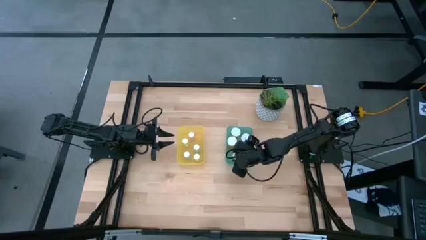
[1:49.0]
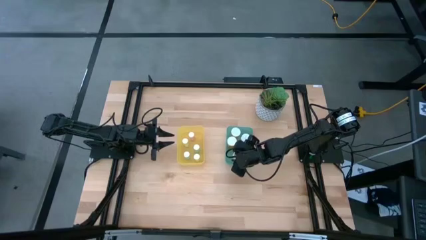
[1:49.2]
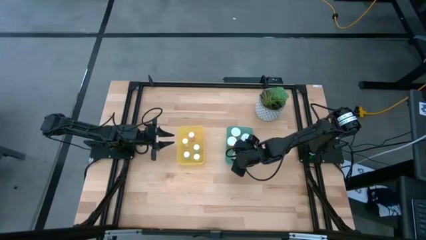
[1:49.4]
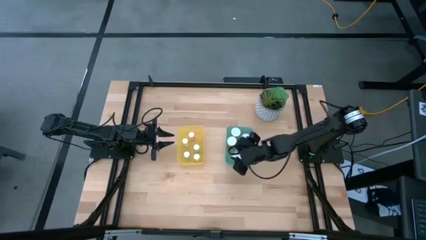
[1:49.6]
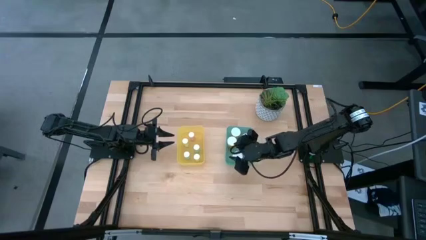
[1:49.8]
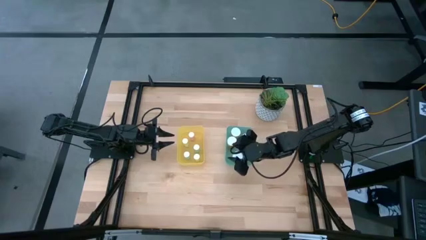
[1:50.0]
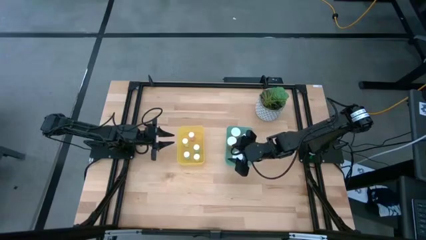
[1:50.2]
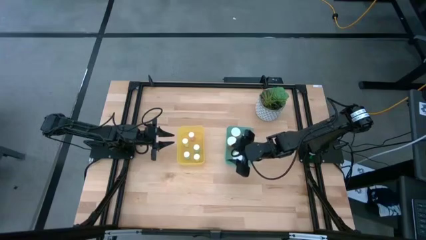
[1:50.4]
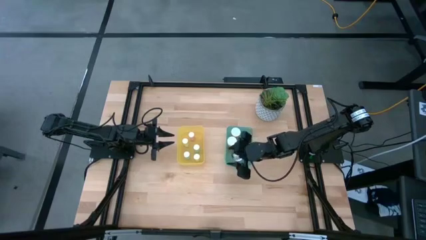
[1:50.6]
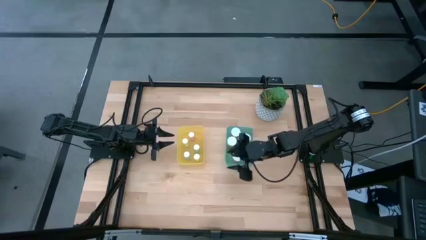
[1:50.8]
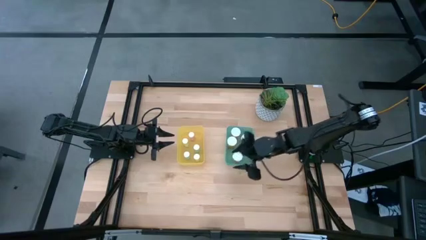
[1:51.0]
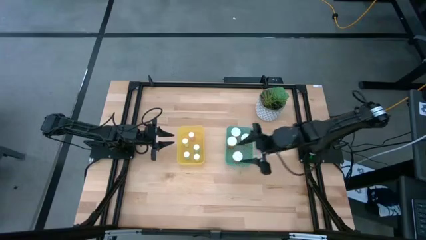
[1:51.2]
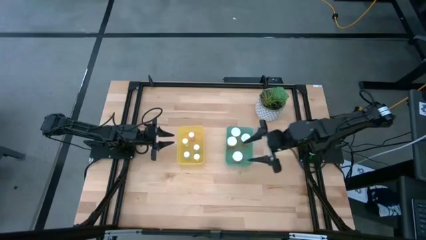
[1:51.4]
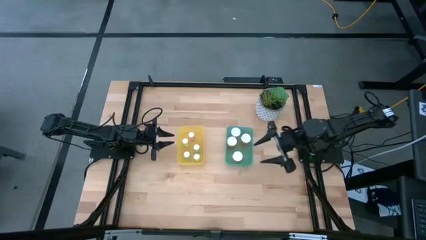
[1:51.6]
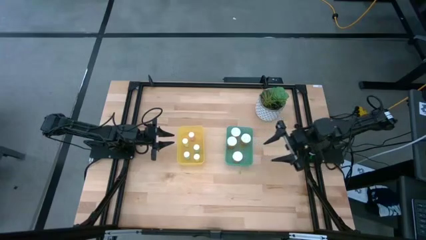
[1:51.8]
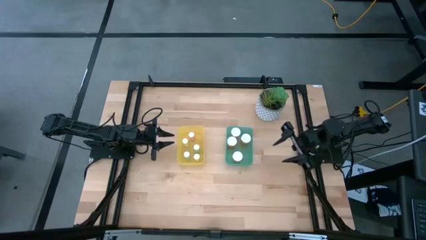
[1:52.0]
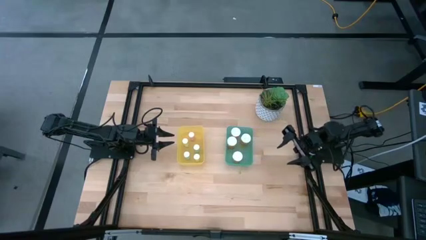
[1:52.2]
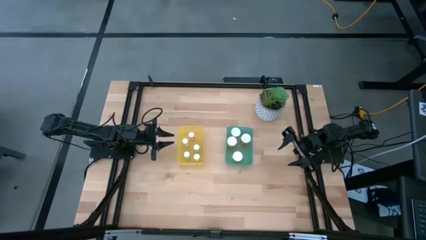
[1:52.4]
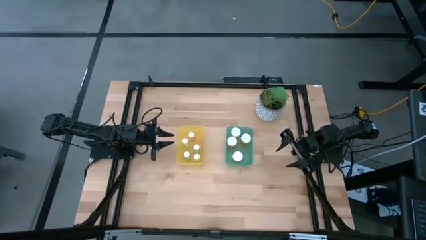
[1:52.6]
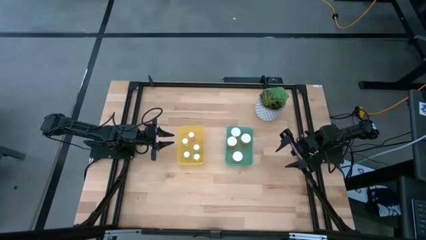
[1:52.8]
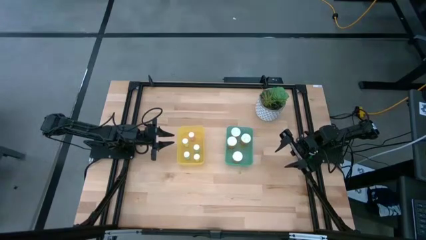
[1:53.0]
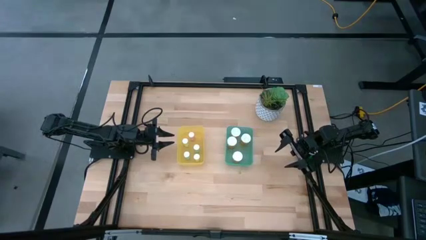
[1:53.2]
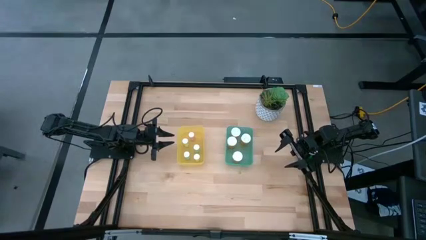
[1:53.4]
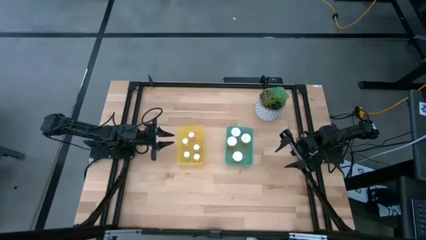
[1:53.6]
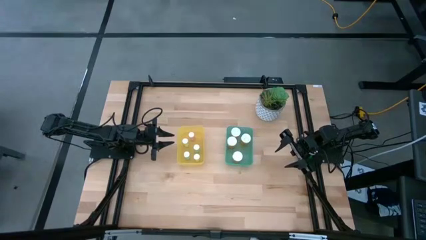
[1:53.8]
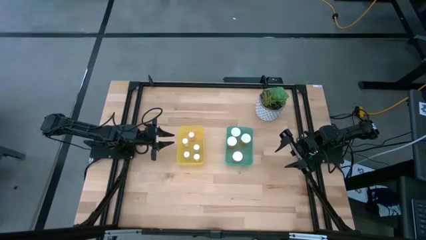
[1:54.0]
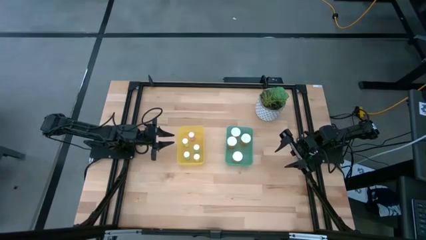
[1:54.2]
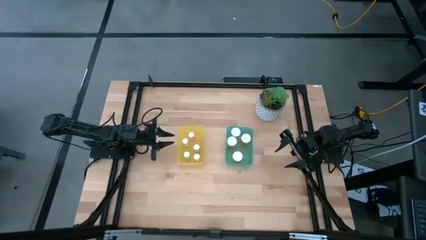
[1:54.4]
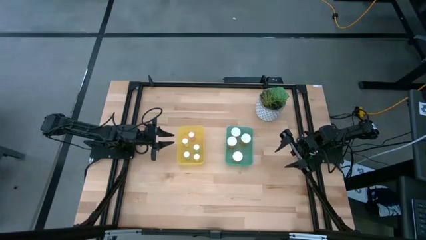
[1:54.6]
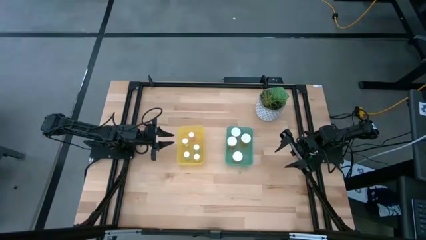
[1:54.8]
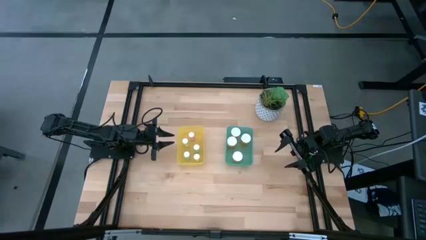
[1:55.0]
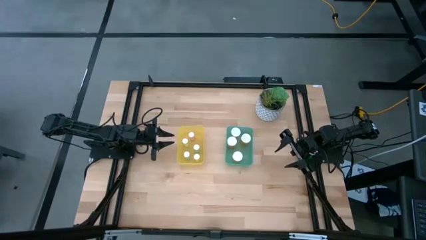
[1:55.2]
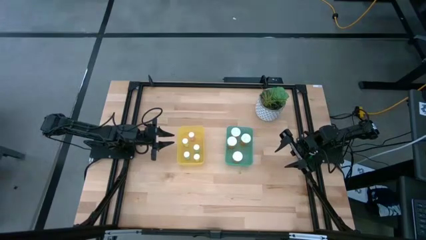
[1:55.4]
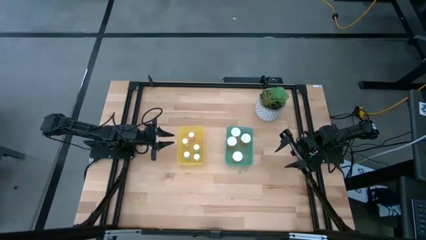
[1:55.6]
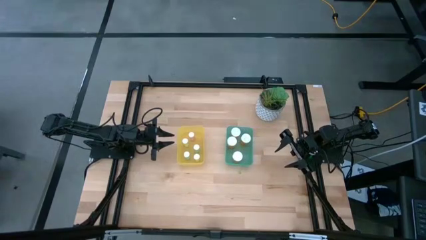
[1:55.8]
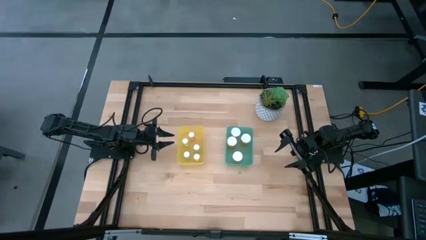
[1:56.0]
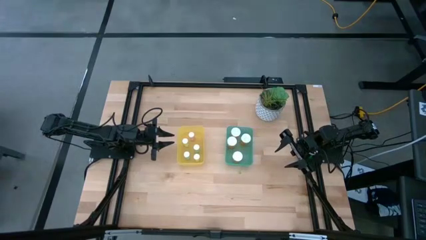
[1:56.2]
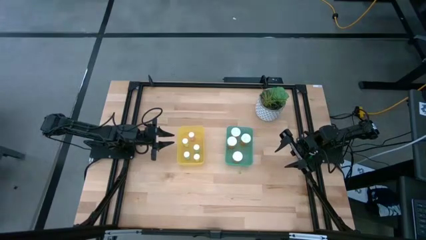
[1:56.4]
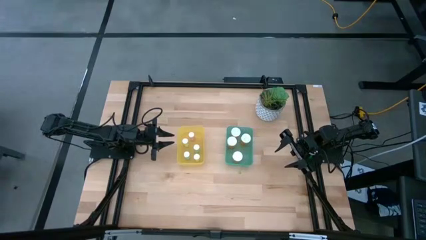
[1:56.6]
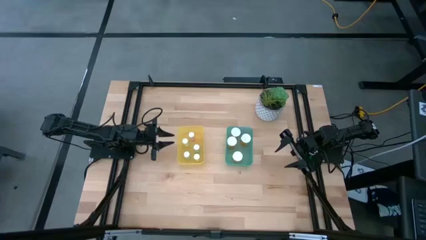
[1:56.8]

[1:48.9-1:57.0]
Task: Pick and place medicine bottles into bin by pill shape (circle, oval)
Return to Home Position

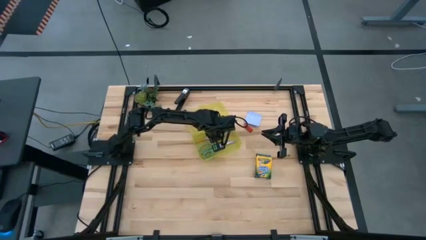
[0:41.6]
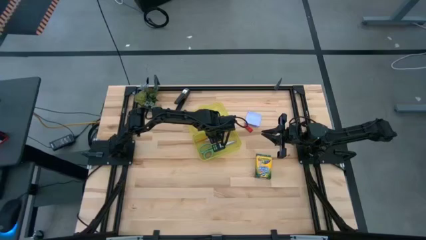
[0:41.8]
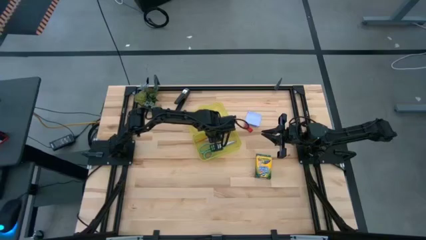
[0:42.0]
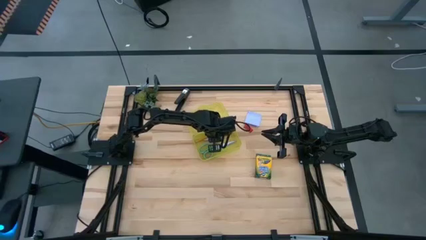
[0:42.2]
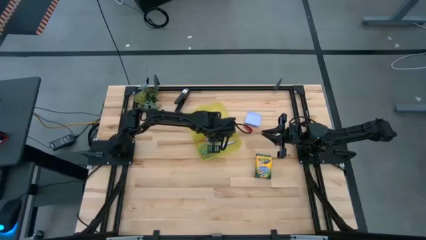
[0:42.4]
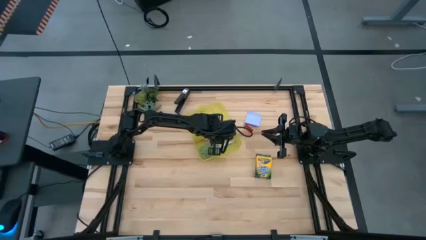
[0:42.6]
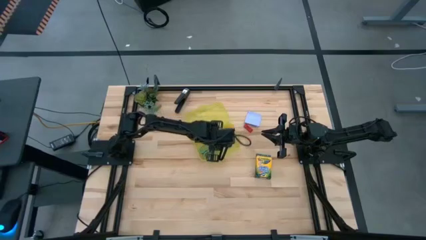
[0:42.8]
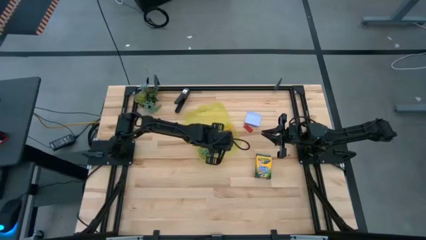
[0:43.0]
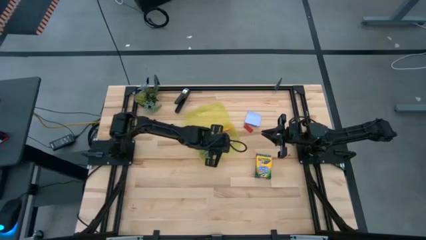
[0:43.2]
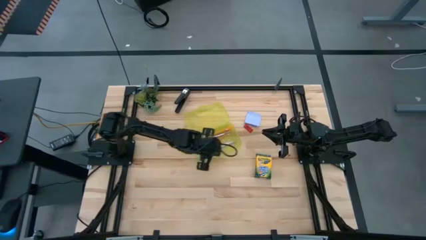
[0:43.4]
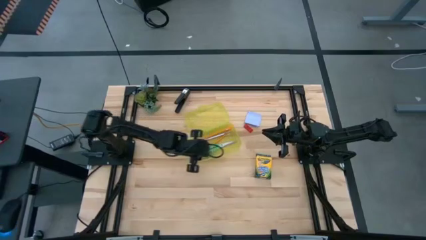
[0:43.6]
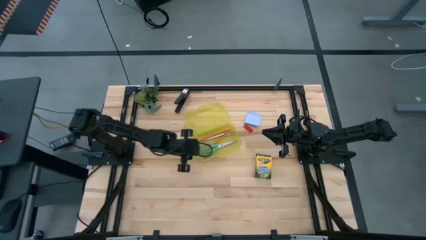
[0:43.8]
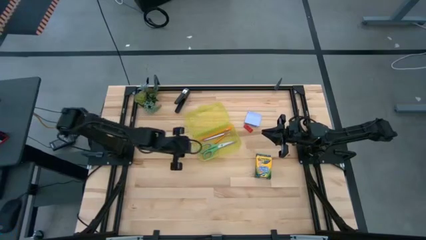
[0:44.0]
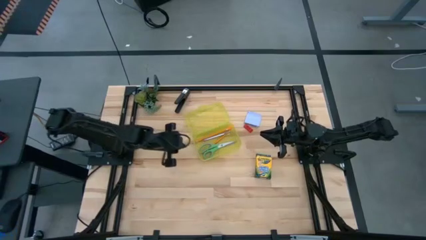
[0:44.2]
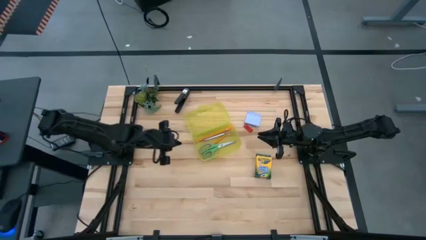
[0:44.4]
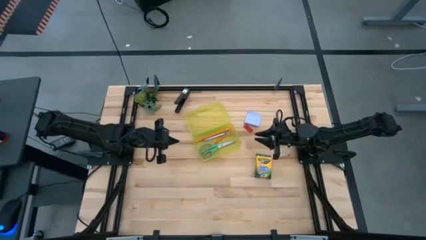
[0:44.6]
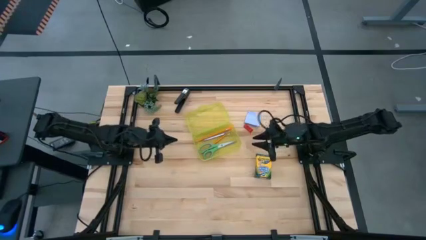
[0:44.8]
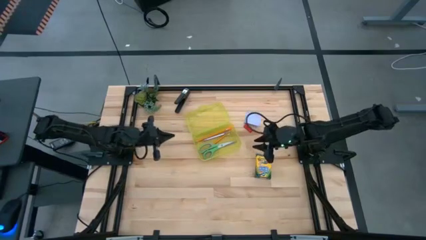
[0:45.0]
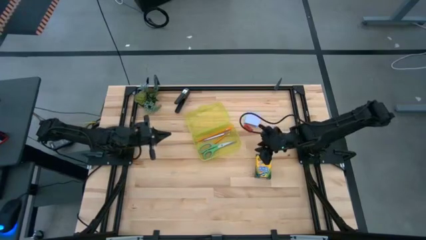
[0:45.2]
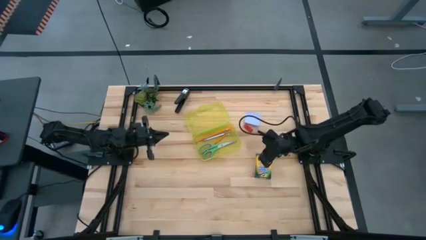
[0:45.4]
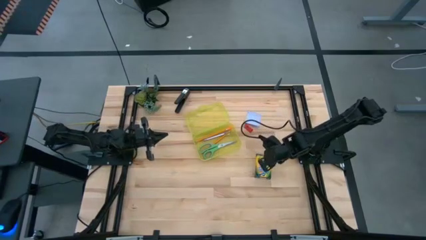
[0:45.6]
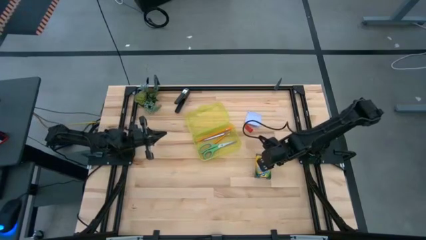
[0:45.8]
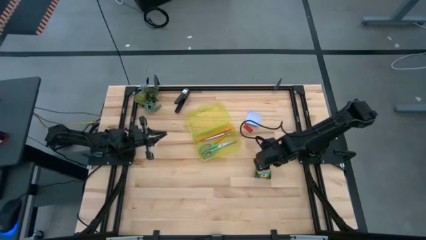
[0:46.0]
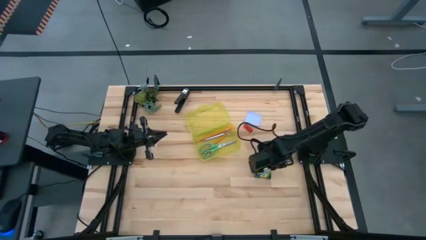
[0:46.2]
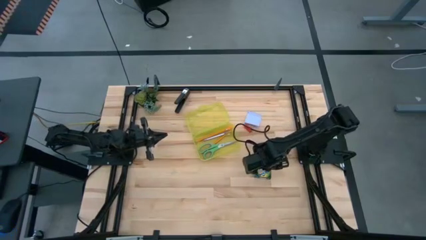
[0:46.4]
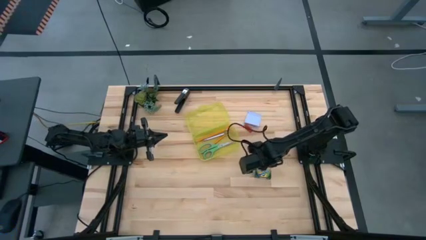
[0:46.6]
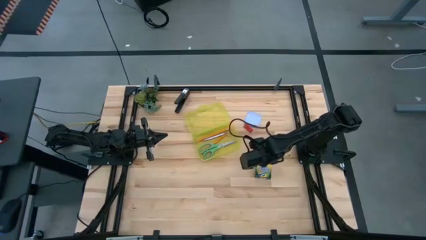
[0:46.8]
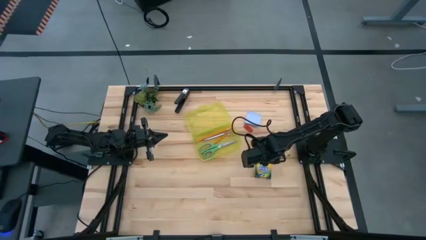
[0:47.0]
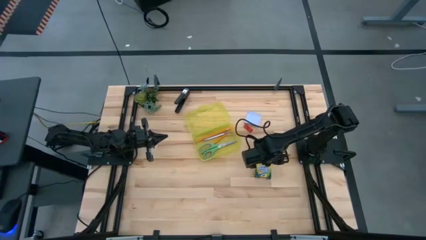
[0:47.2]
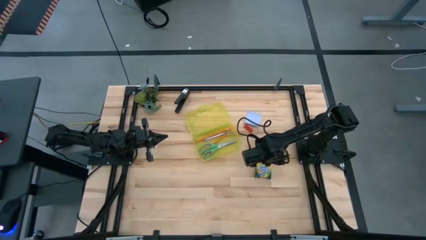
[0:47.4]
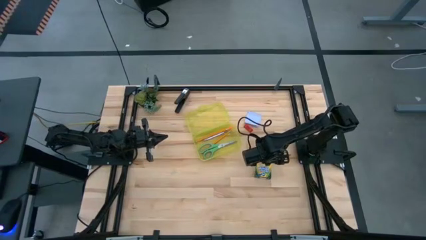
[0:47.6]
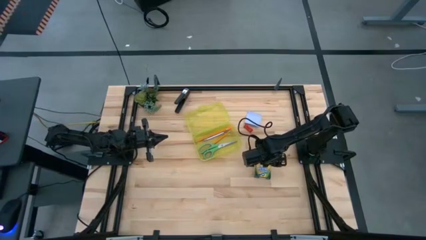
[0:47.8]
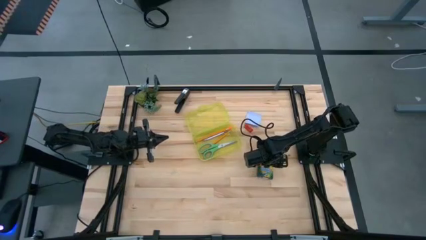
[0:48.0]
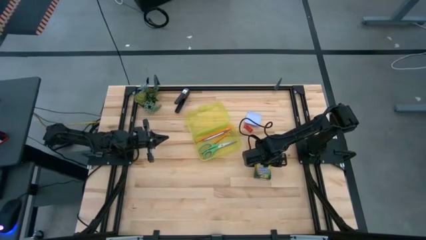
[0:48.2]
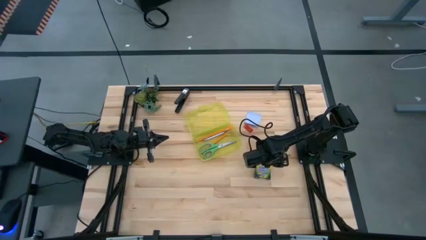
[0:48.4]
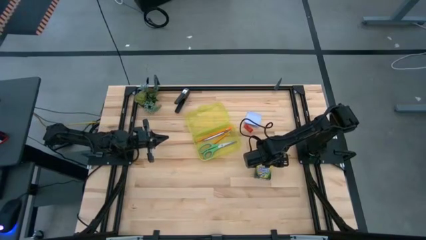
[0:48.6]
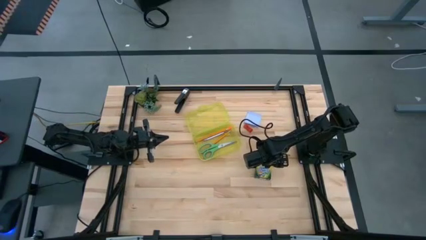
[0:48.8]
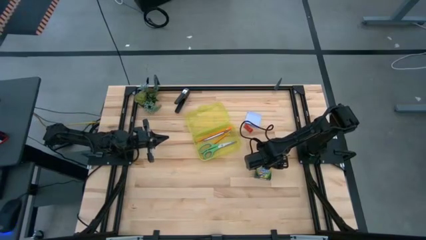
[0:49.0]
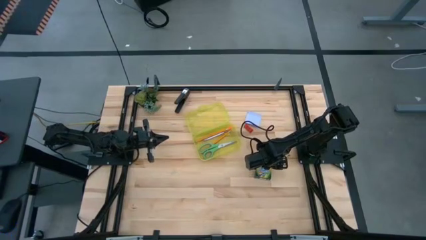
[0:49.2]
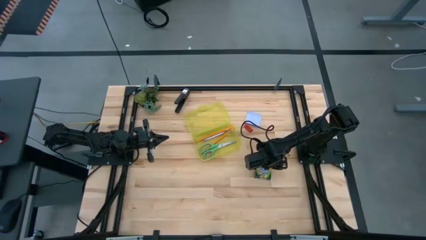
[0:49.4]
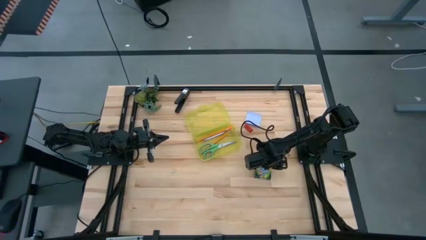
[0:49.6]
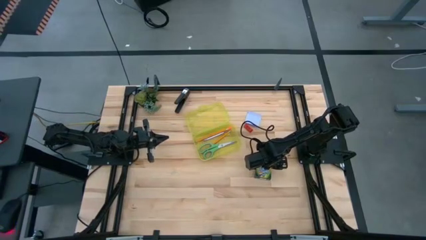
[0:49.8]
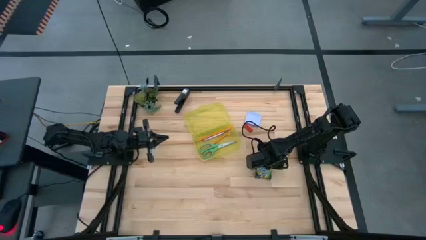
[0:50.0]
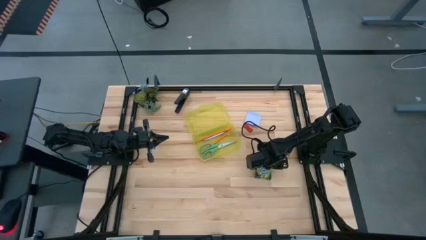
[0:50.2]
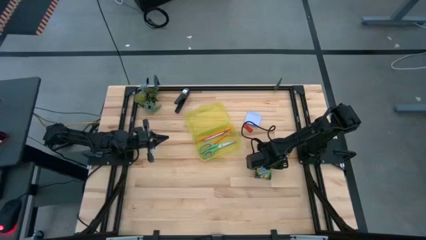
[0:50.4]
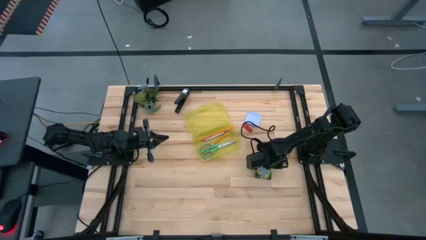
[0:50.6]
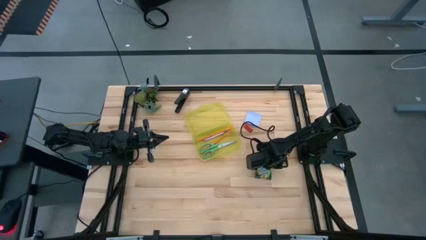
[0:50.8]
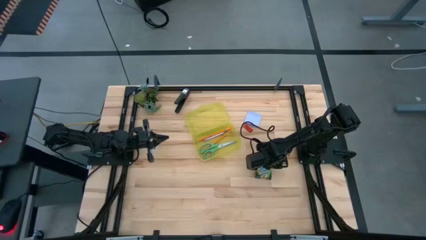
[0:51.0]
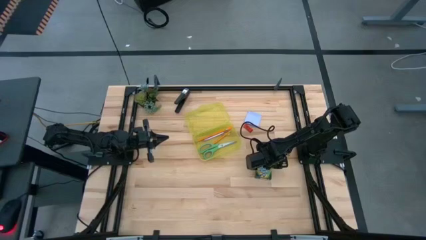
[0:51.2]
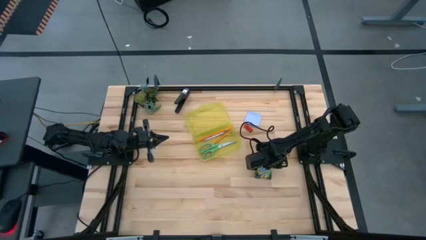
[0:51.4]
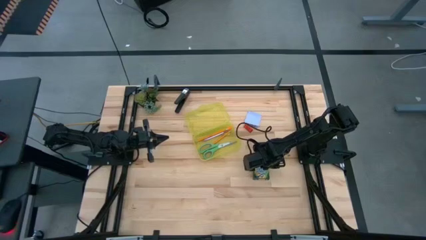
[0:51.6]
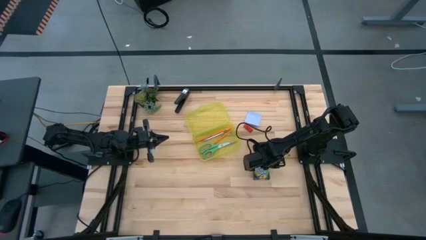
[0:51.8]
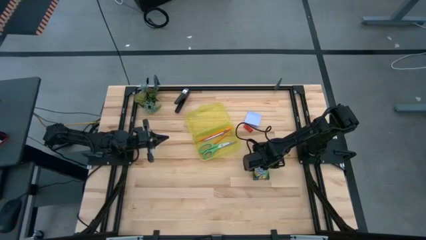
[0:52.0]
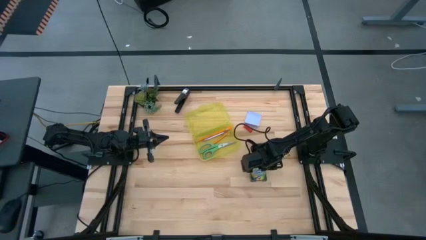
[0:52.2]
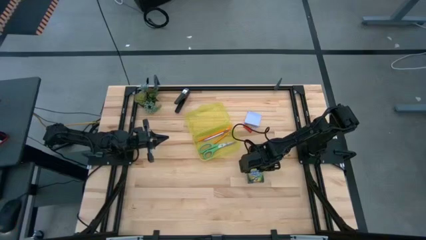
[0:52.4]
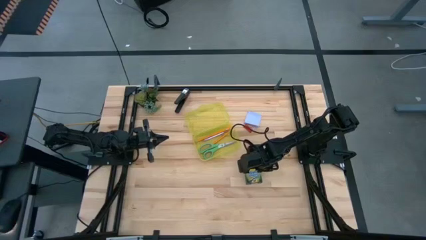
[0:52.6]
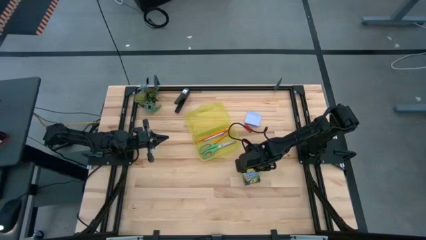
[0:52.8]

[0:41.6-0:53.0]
Task: Pack school essentials
Put the yellow crayon box into the yellow supply box
